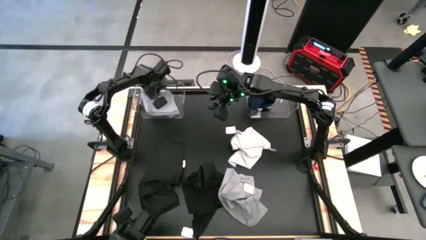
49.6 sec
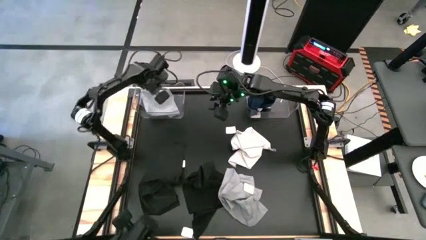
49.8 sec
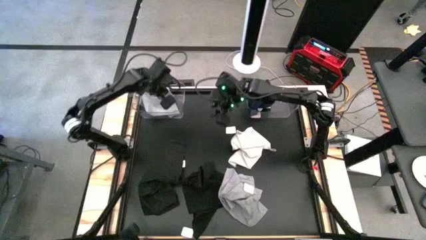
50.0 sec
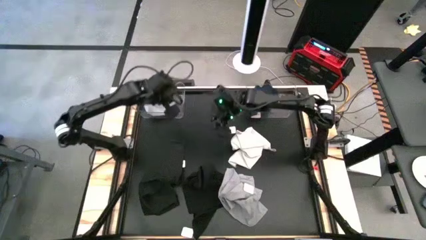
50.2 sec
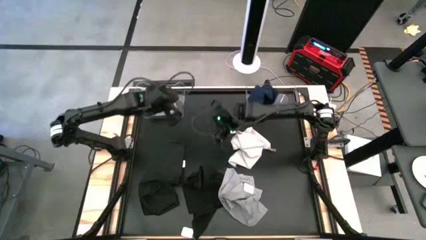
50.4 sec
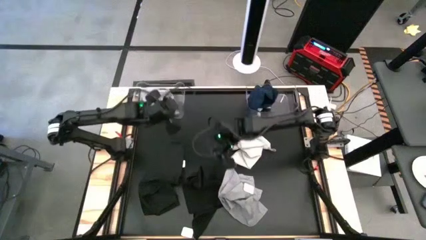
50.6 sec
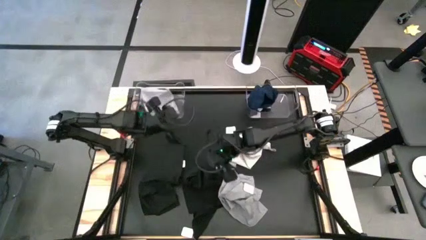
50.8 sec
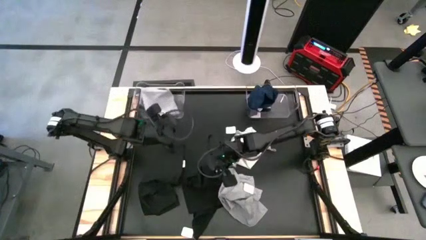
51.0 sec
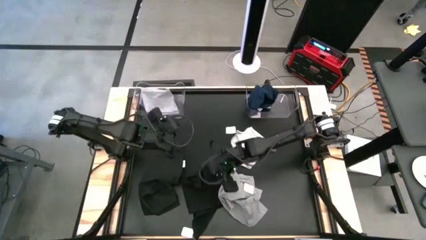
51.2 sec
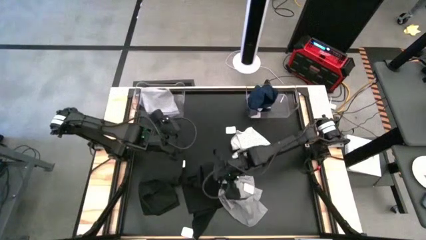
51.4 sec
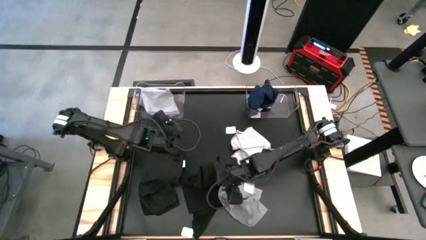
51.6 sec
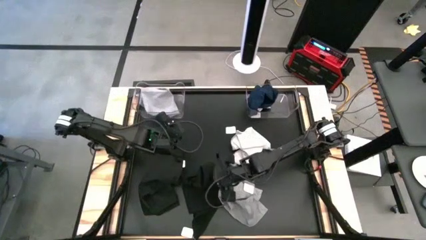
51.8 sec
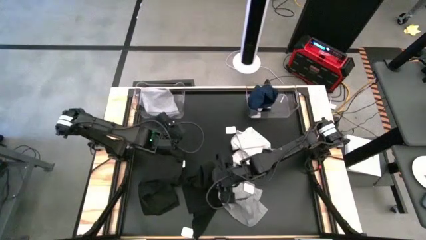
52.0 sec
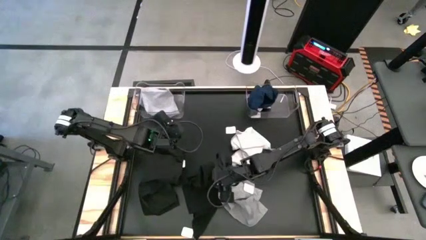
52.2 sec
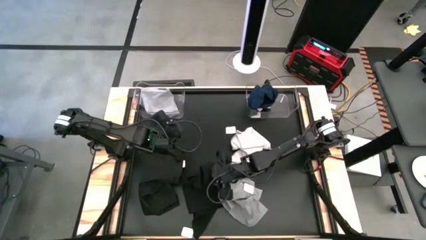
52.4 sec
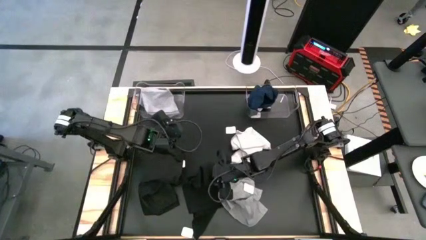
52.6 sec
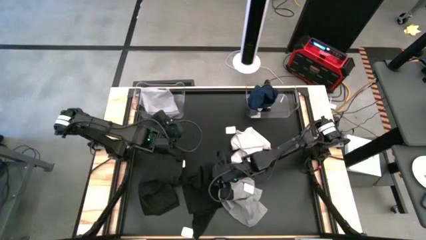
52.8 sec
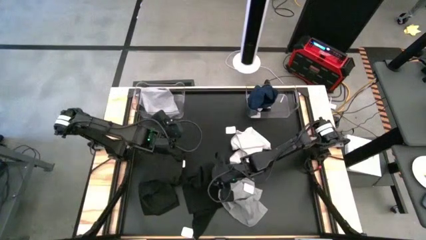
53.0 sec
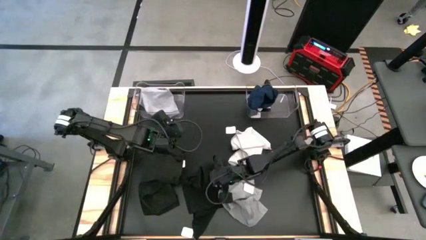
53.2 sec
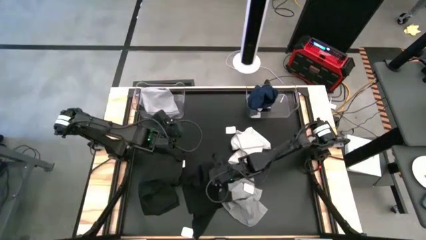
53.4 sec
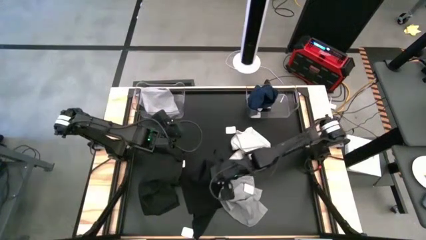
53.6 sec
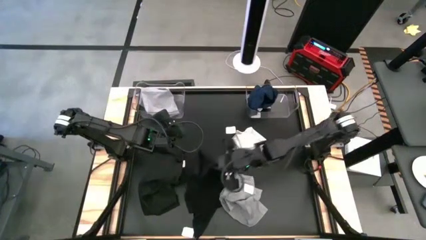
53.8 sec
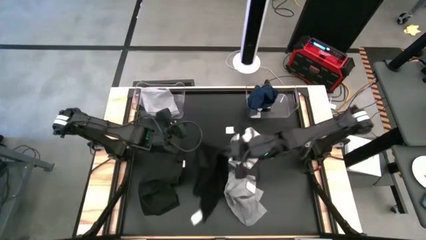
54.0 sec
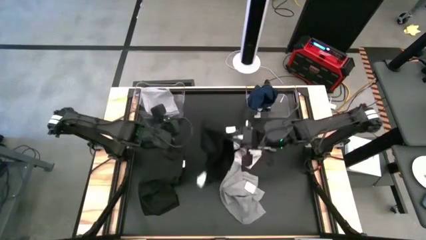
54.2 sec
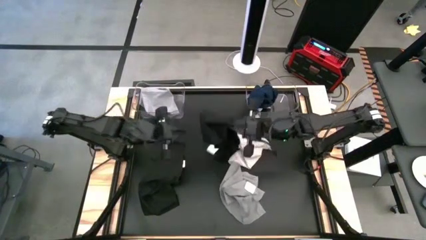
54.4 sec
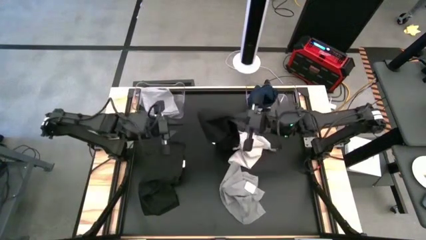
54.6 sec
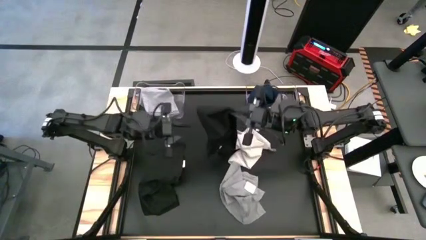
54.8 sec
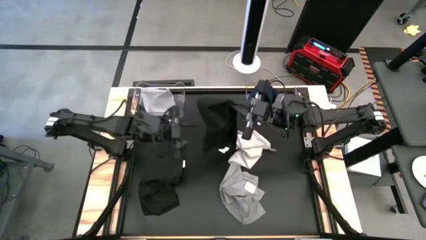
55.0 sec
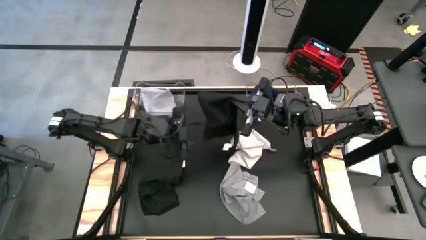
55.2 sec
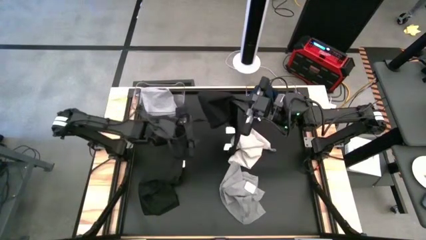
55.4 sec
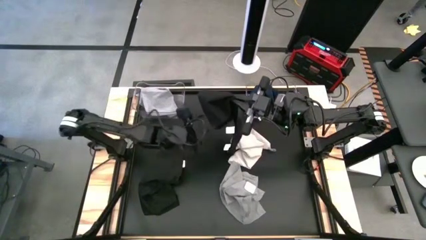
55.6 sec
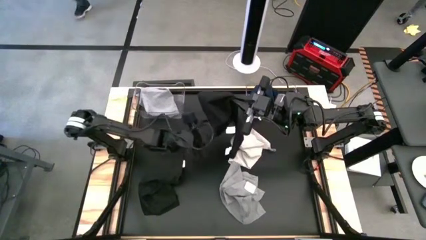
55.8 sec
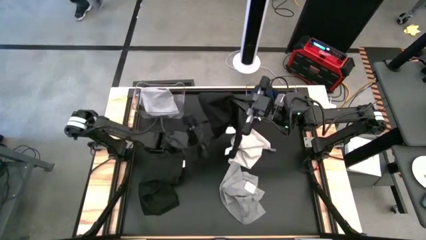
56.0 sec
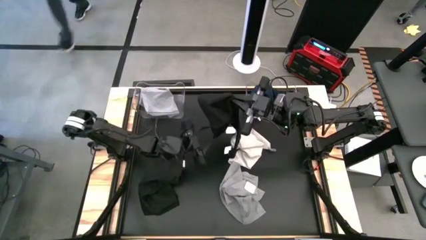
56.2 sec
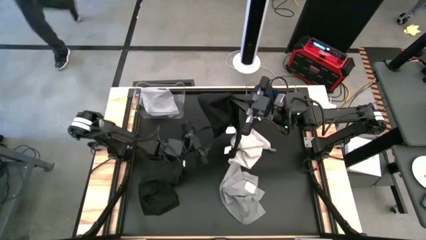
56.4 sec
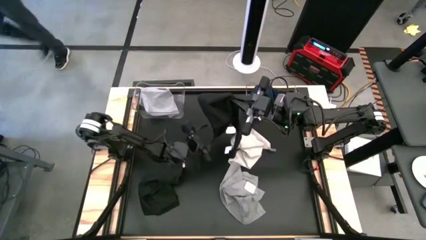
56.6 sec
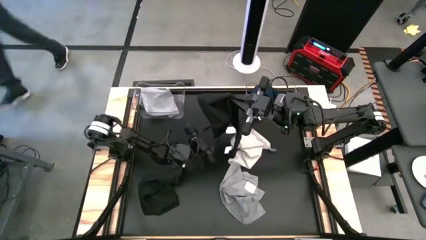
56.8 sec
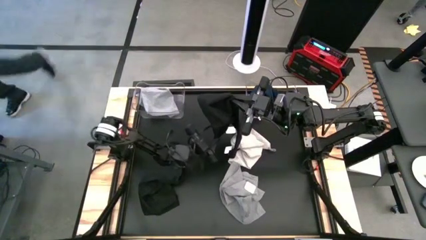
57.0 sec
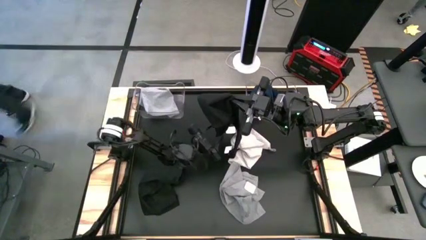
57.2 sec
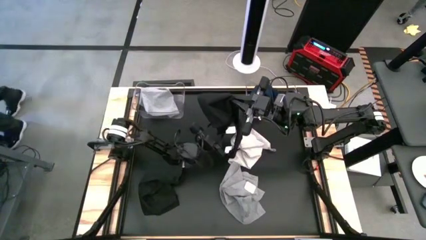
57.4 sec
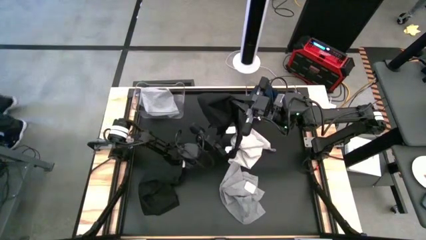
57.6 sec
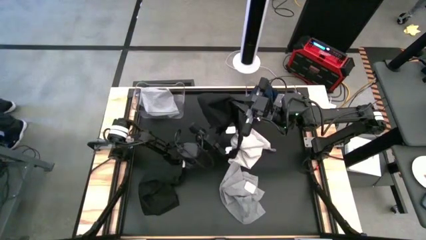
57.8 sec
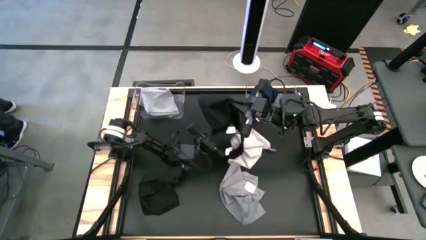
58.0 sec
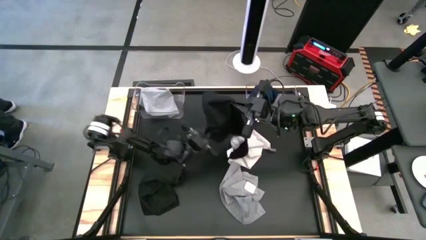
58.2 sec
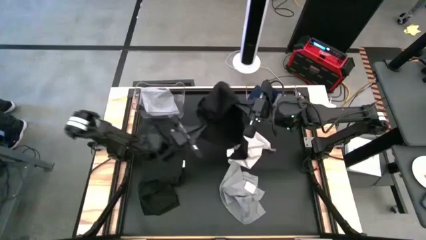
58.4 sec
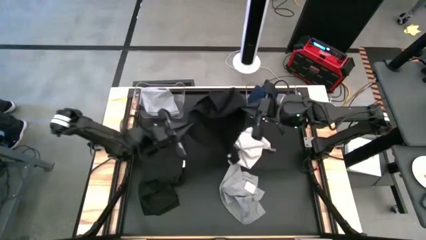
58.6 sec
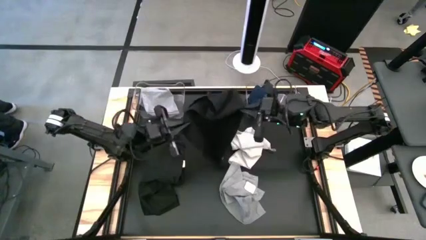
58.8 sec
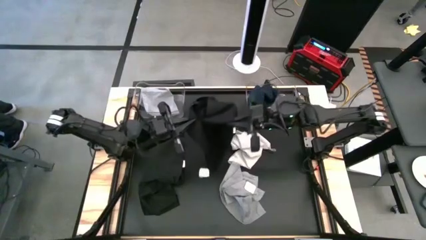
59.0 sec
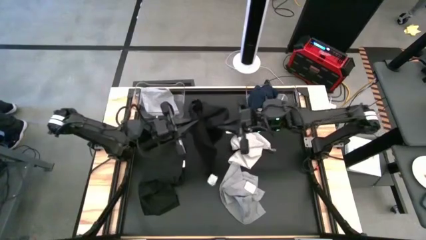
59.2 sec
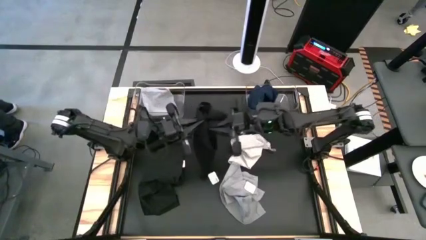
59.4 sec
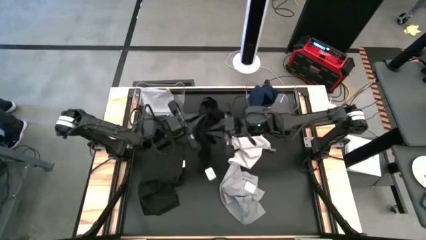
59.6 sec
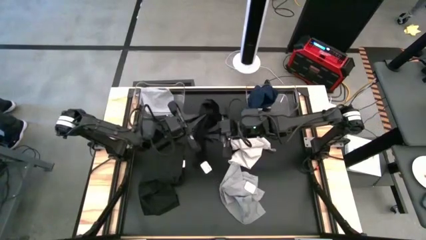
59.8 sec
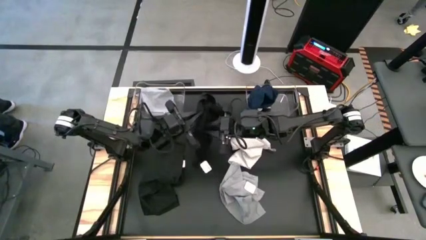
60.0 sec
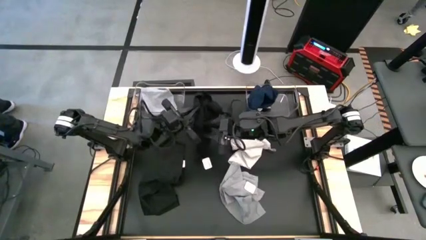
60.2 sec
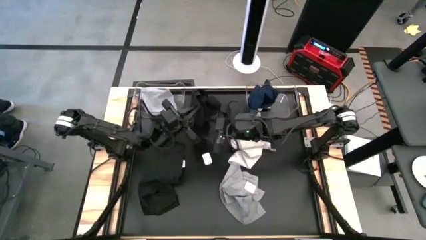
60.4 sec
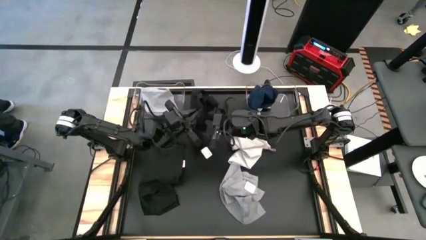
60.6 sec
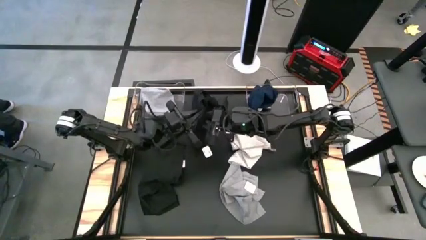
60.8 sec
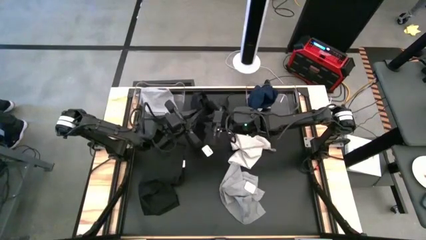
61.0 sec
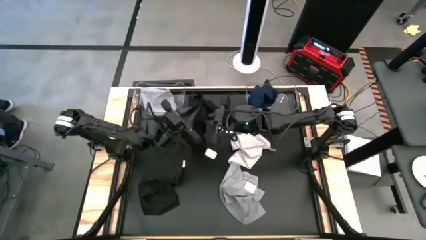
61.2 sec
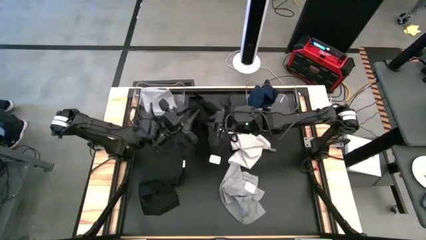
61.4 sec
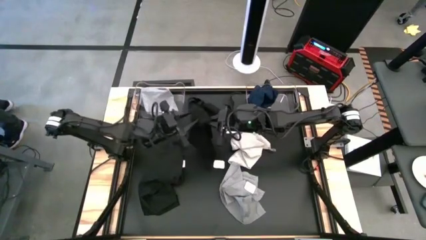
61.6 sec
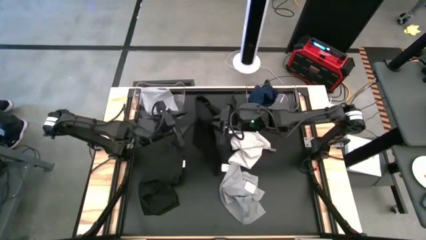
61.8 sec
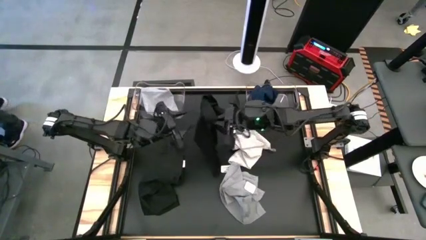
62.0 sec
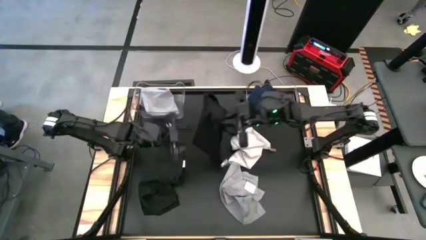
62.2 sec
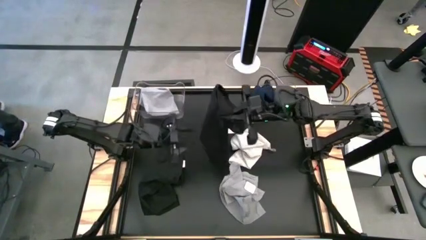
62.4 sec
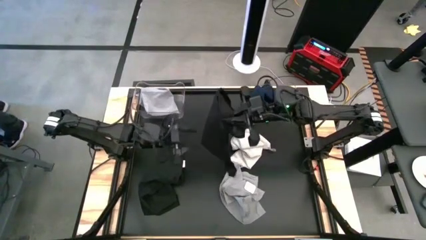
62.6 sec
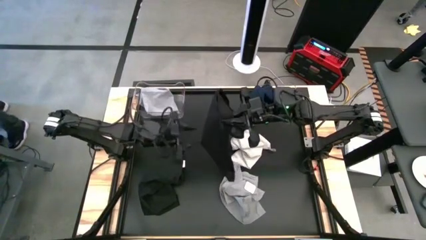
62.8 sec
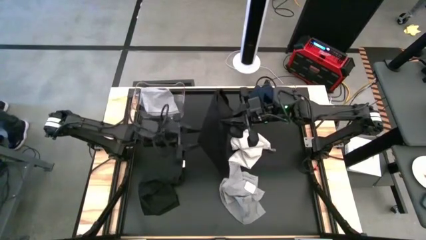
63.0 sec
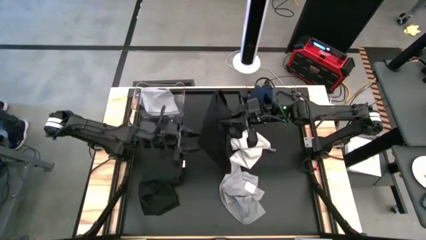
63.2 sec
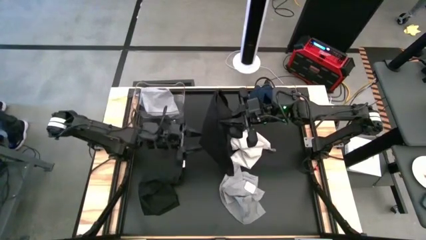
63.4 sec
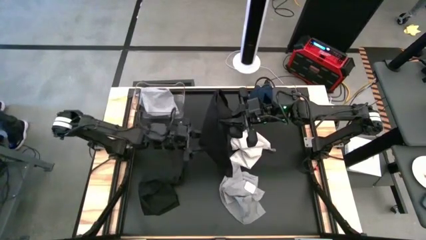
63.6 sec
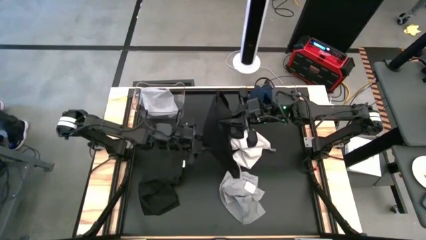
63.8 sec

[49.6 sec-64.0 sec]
Task: Sort towels by color in basket
Put the right black towel into the right transparent bin
